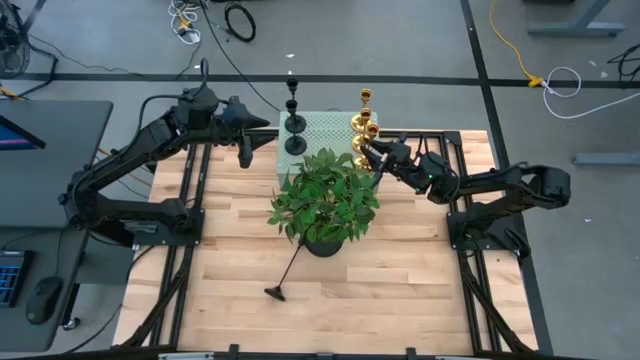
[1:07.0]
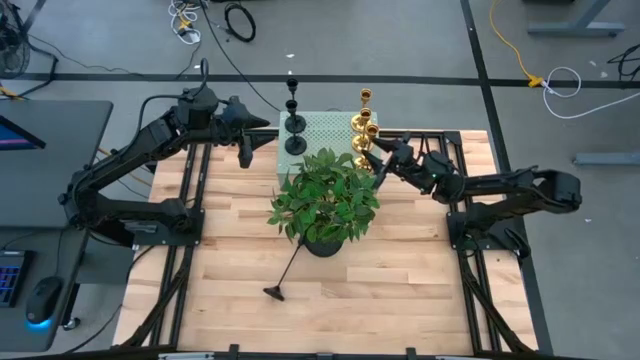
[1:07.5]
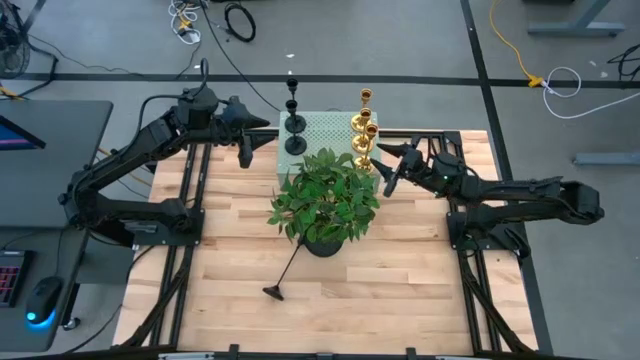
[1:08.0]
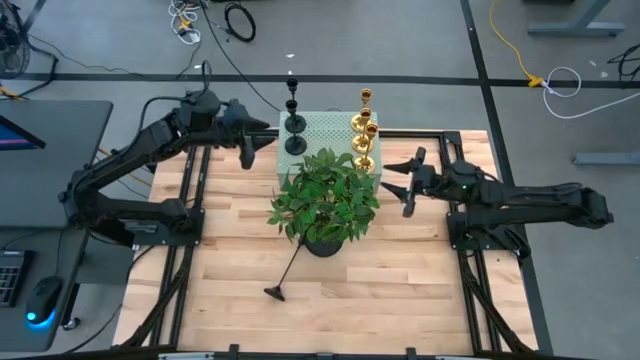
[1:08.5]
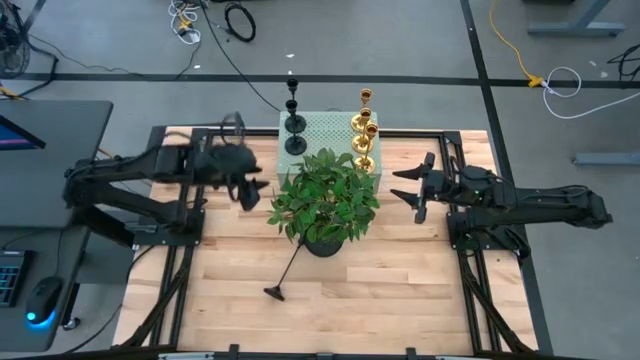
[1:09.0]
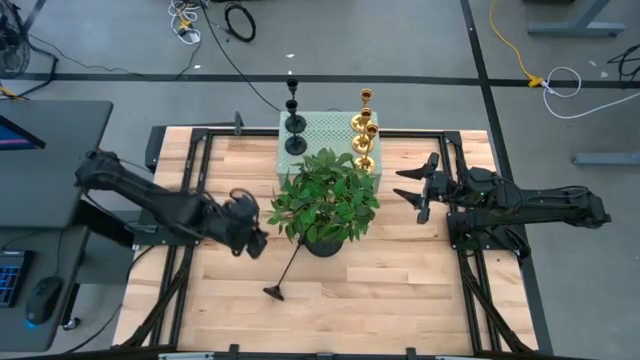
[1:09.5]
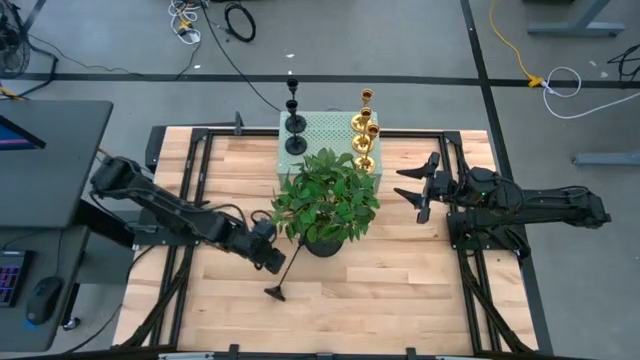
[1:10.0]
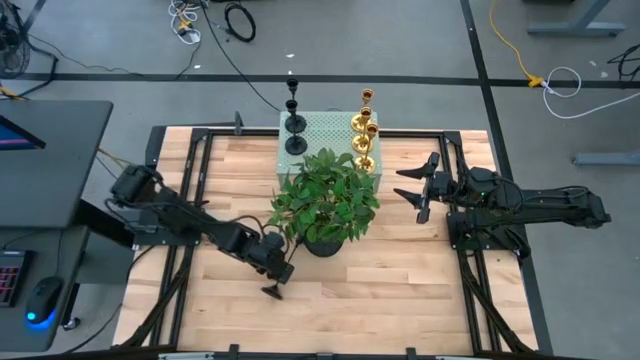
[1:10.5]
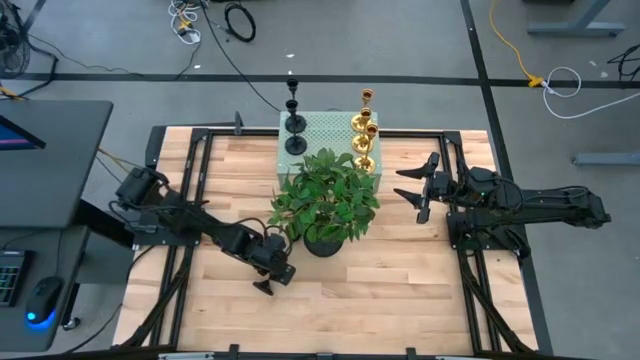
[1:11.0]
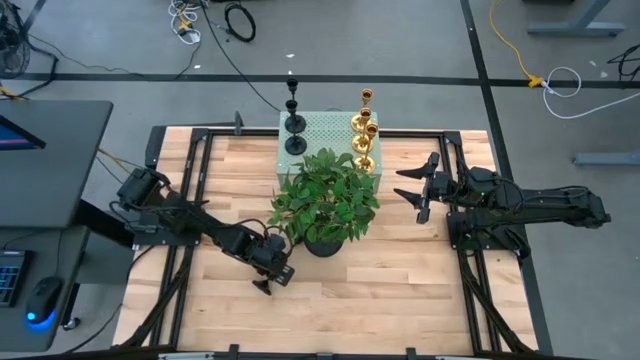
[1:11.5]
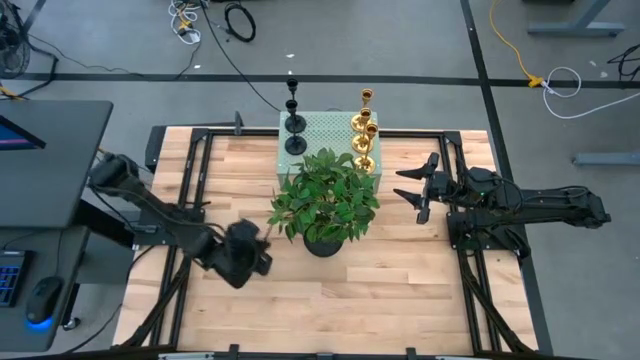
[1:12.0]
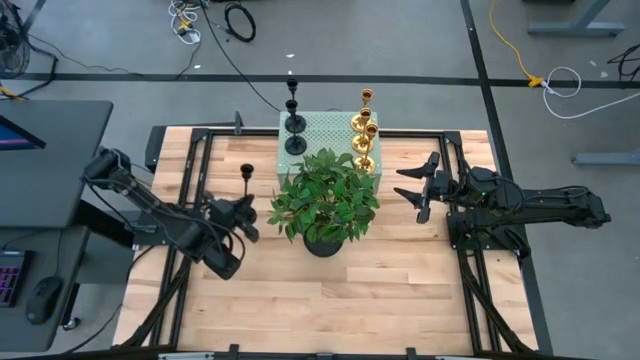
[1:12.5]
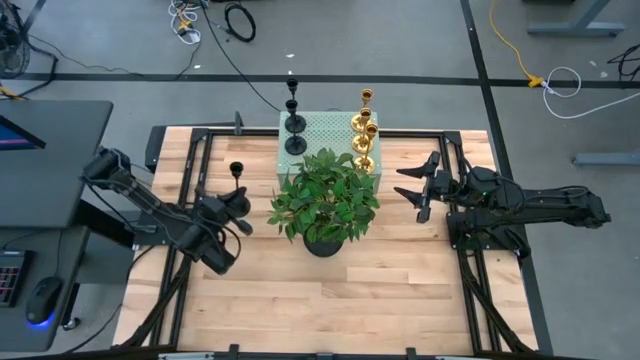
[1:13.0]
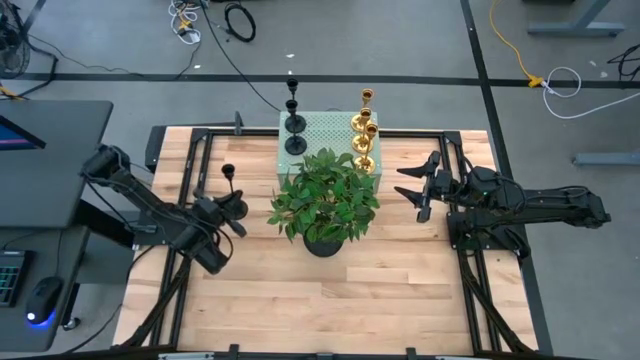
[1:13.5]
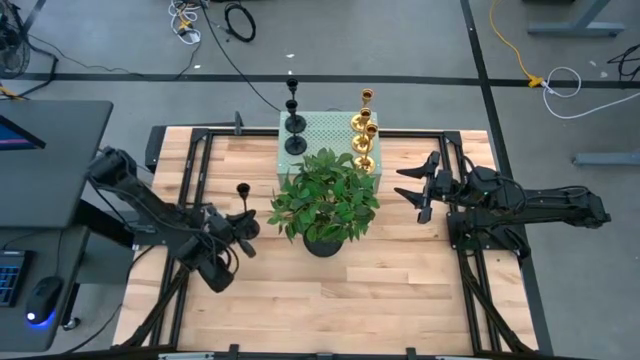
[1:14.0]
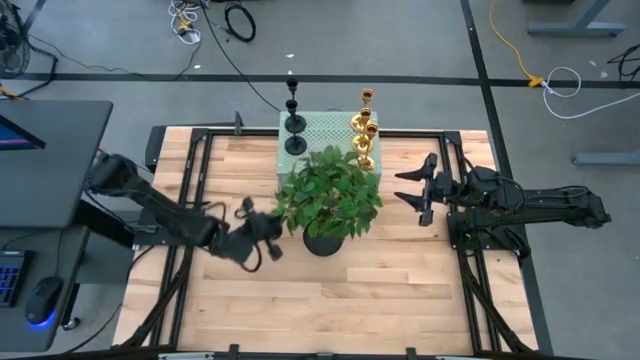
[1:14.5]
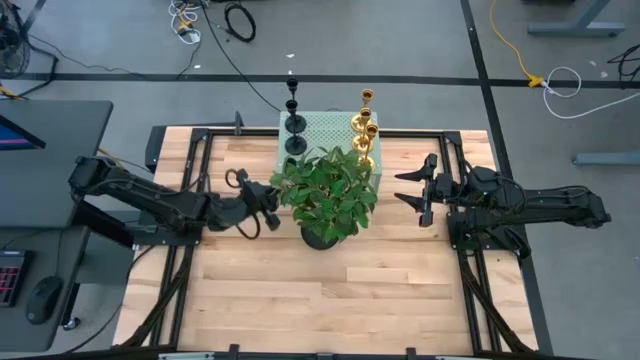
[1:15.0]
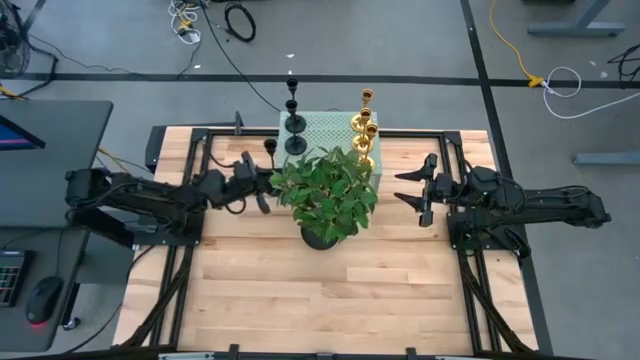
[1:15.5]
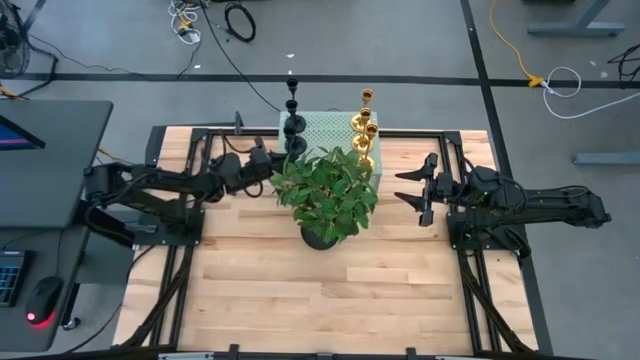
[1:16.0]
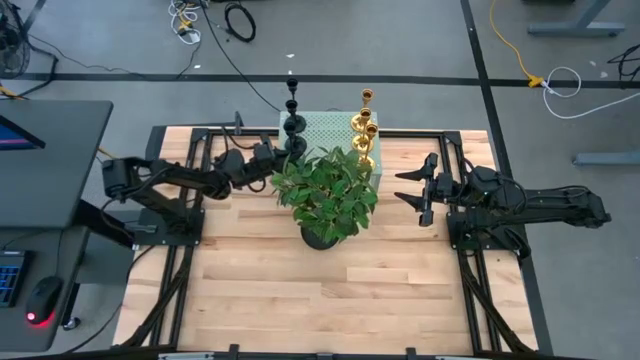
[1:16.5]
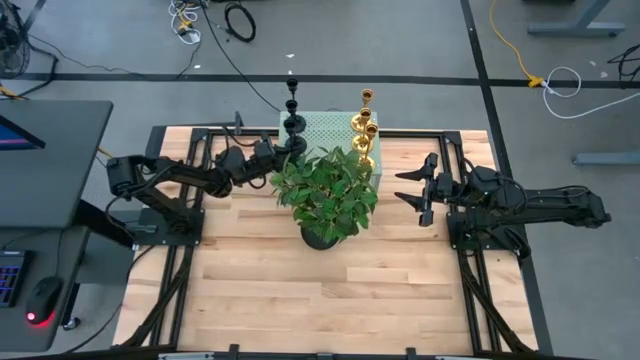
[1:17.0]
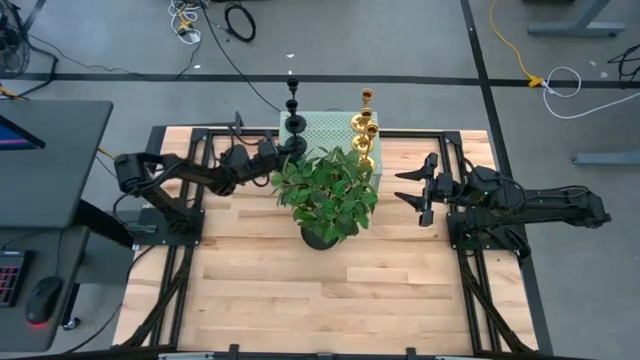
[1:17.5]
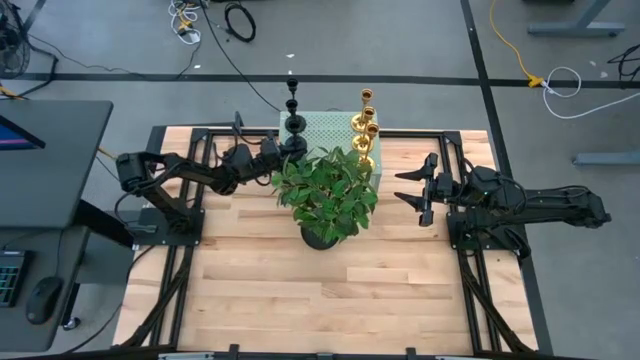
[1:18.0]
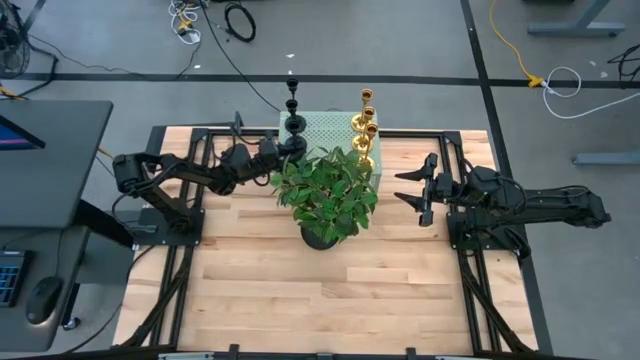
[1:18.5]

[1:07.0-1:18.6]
Task: Pick & Place candle stick holders
Put the black candle holder on the shelf aligned with the other black candle holders

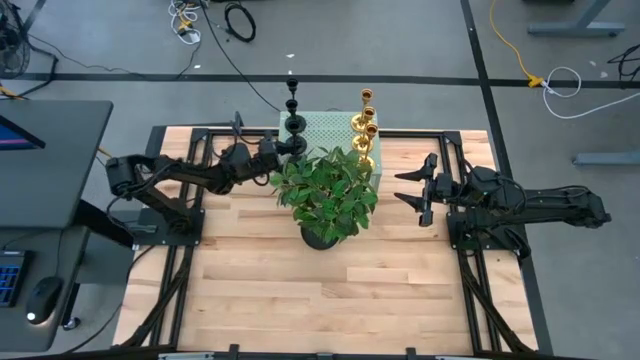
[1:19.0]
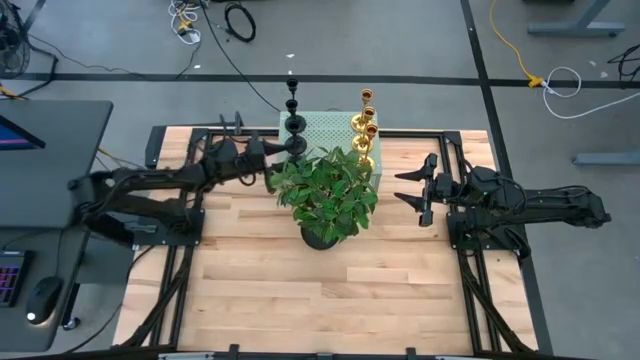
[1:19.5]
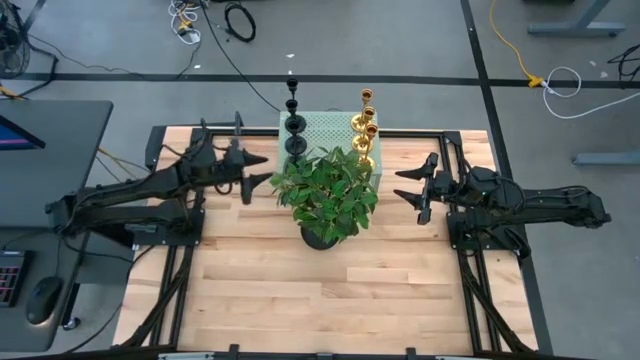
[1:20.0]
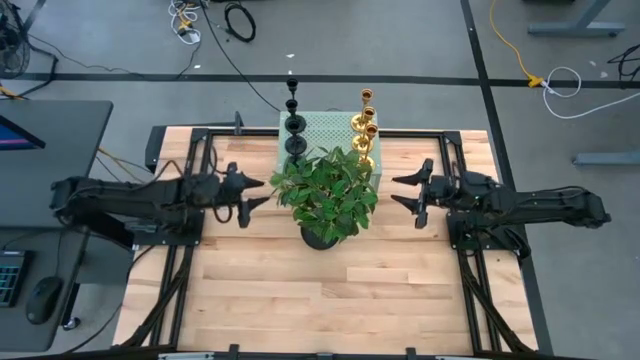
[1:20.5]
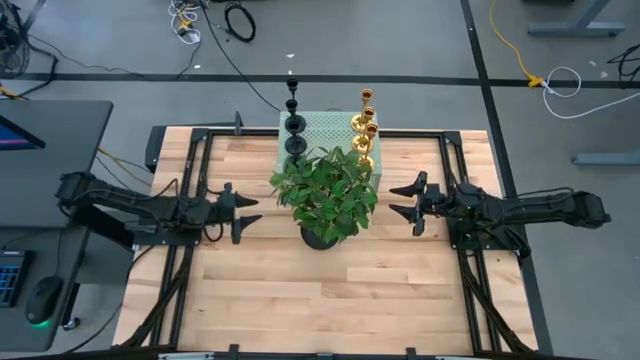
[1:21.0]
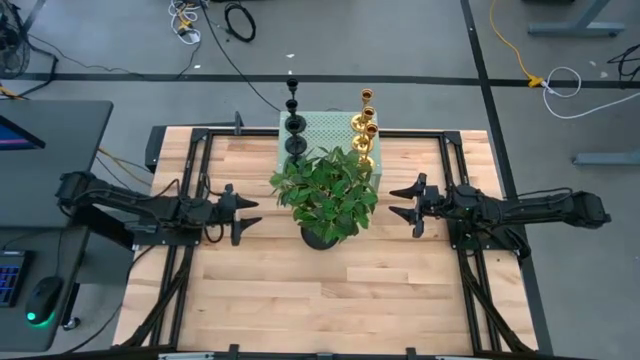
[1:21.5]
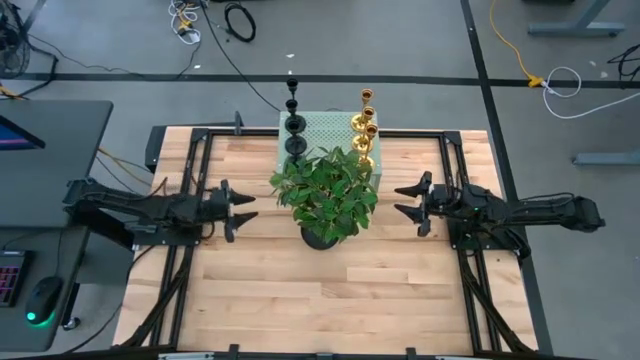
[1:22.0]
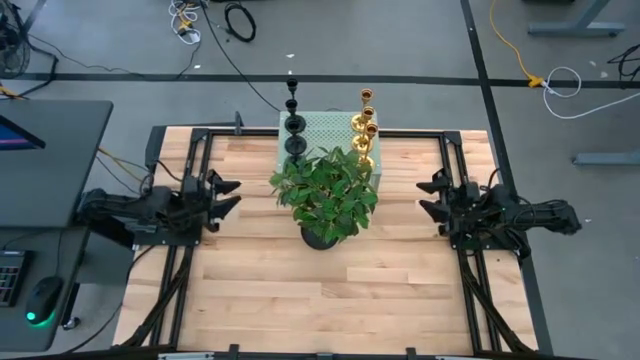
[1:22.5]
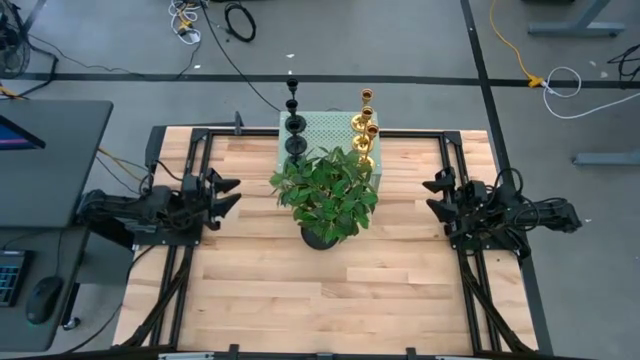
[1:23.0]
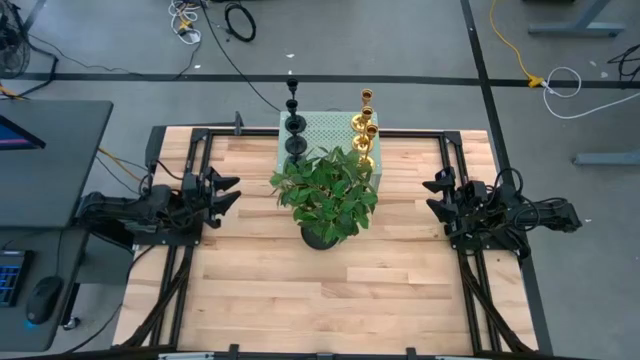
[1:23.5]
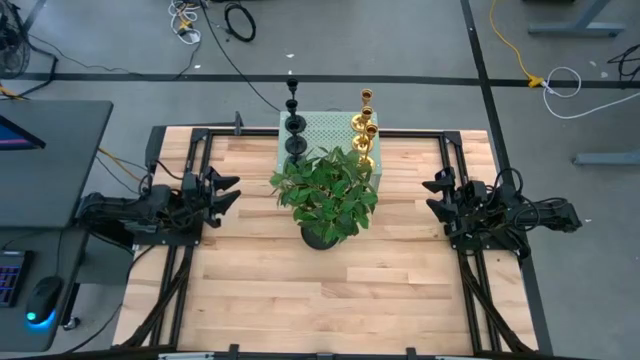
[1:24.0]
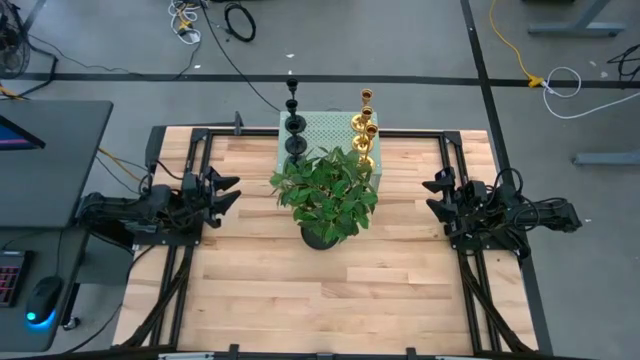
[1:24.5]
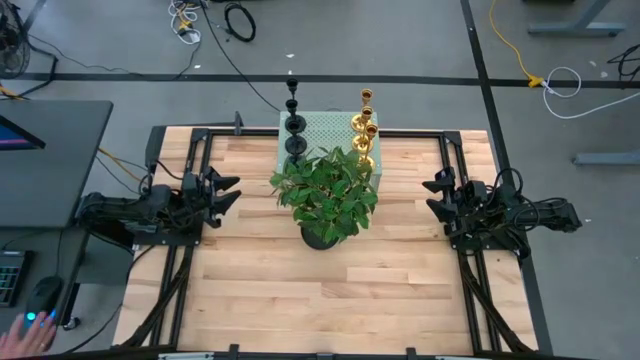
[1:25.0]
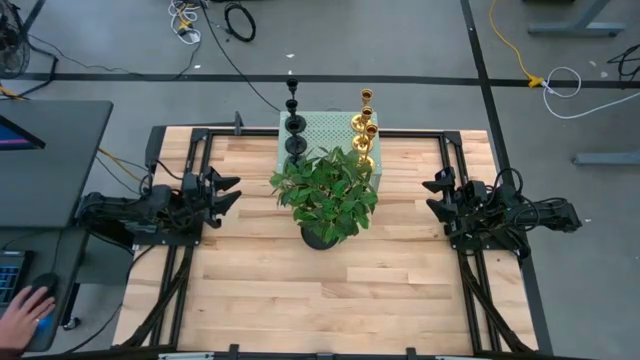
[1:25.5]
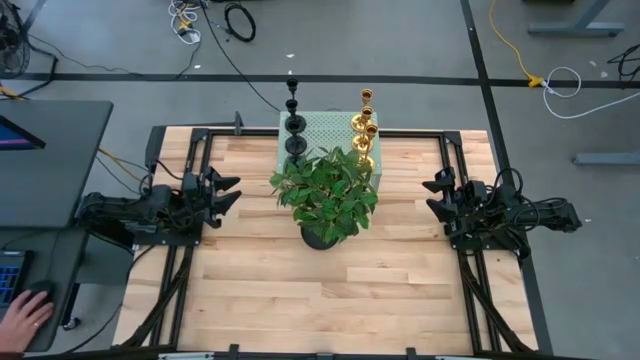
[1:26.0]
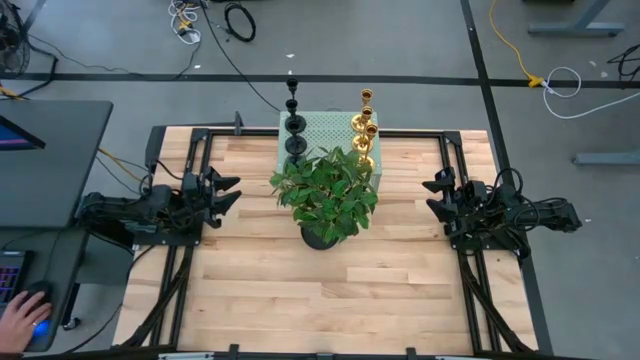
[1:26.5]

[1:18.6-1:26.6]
Return to Home Position
